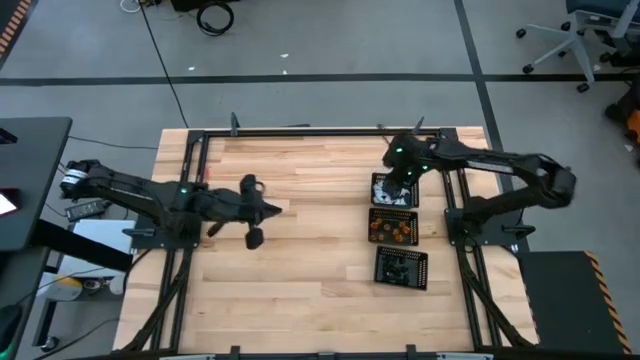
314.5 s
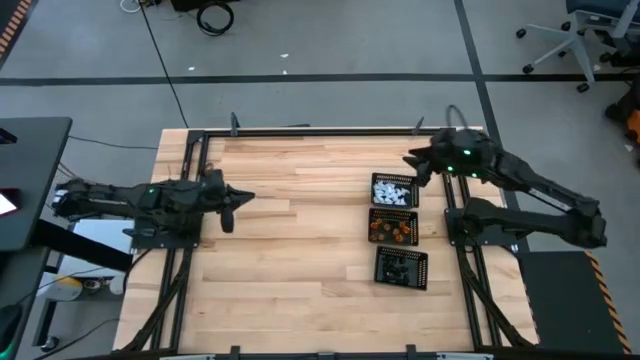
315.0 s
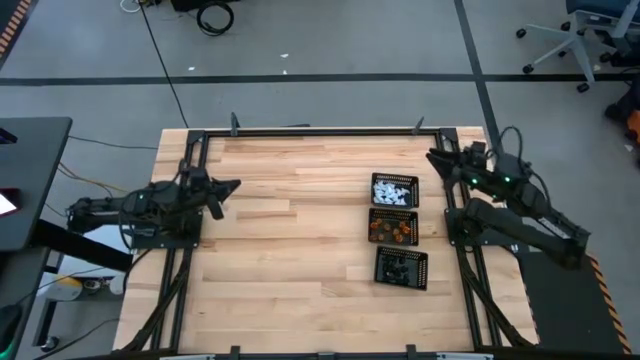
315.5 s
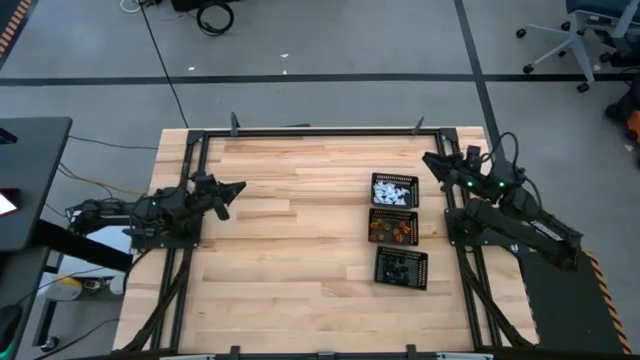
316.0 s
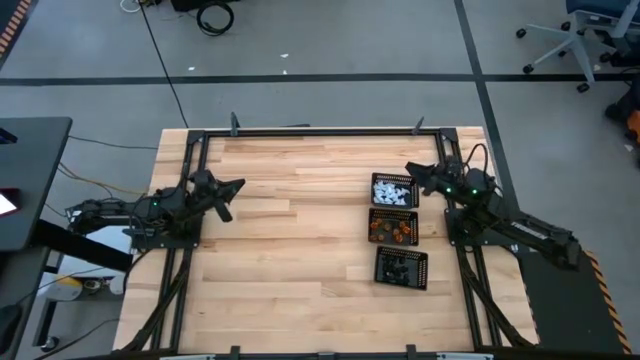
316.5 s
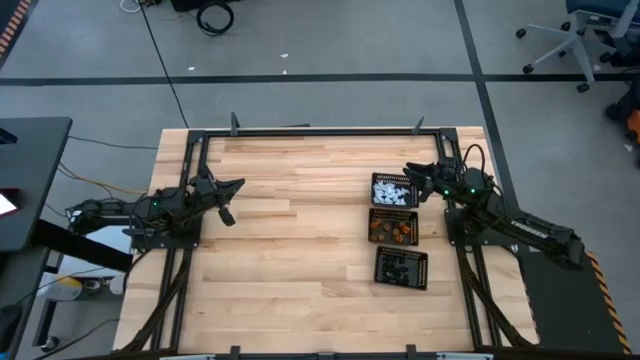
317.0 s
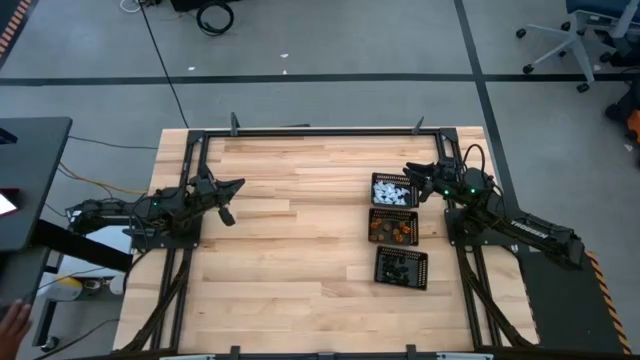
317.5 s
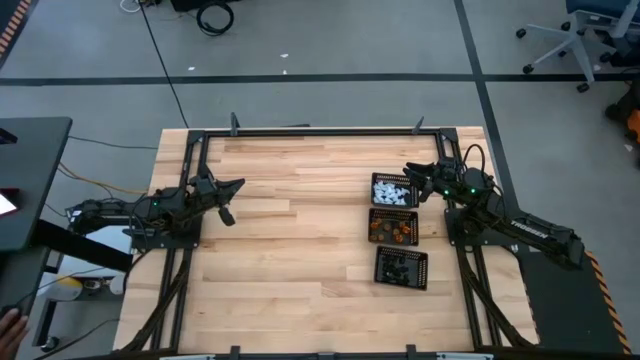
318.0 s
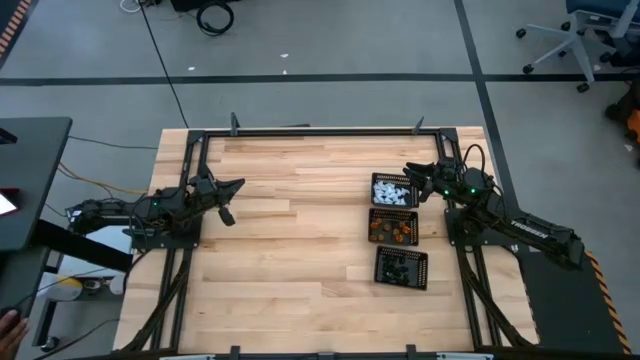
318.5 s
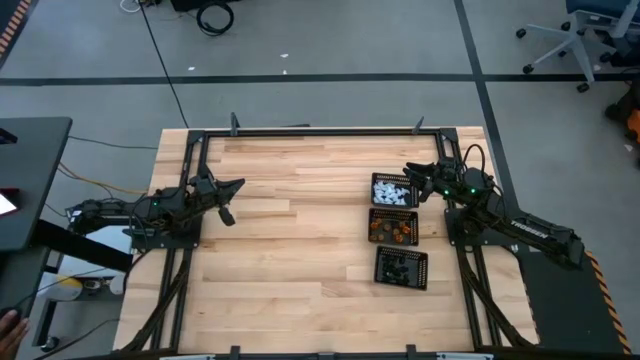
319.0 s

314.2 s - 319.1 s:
Task: Sort Halloween decoration
Return to Home Position

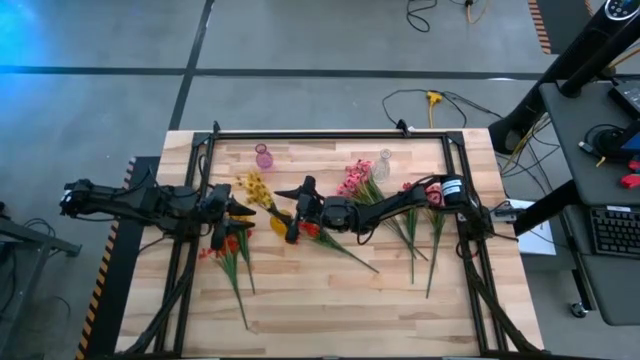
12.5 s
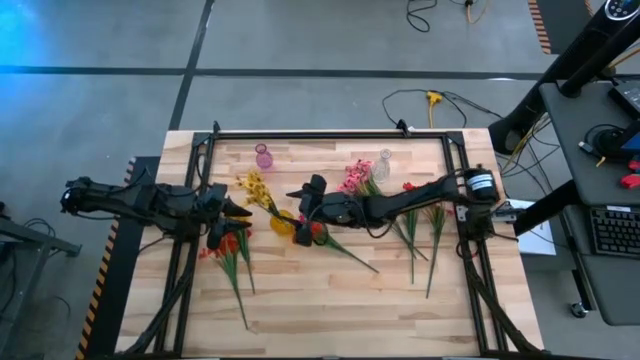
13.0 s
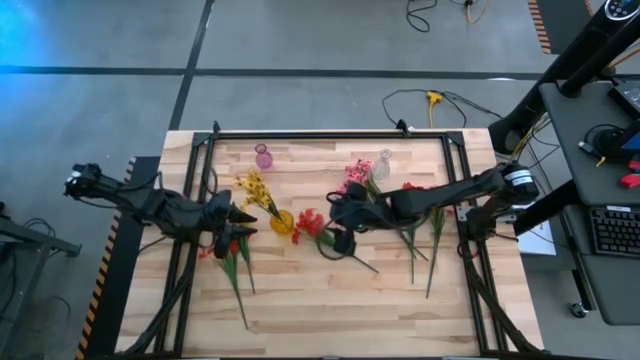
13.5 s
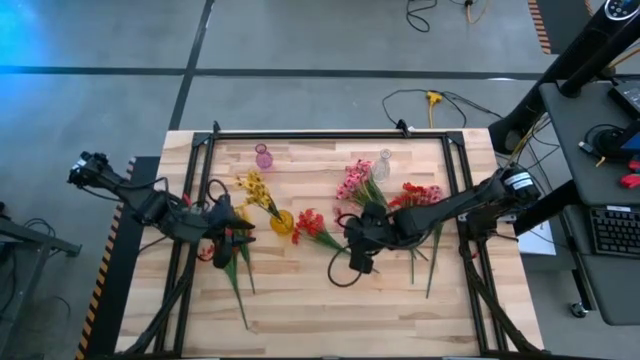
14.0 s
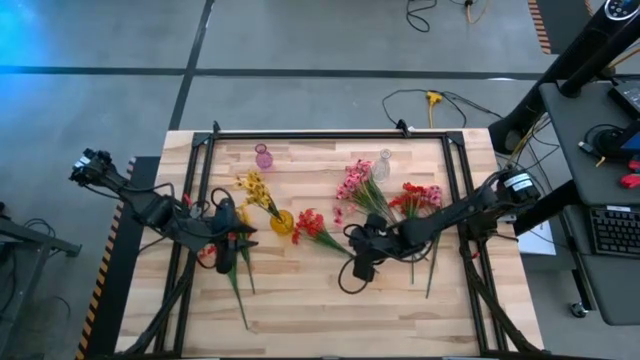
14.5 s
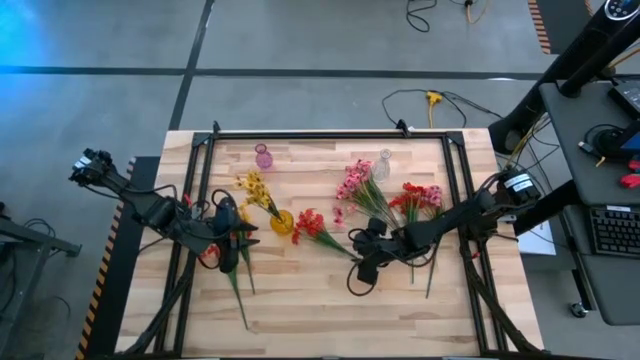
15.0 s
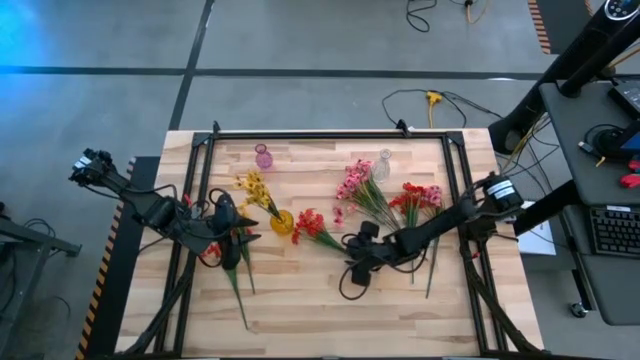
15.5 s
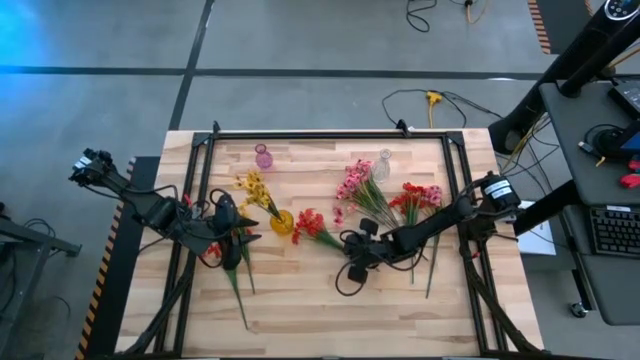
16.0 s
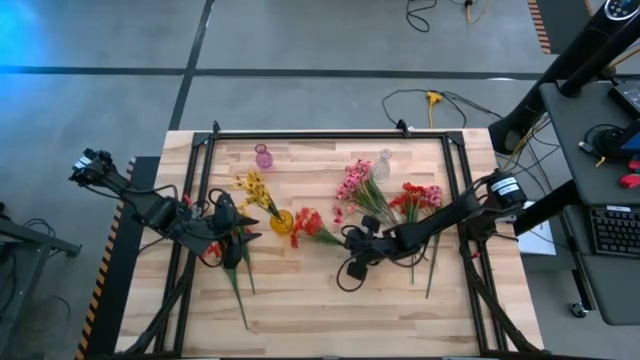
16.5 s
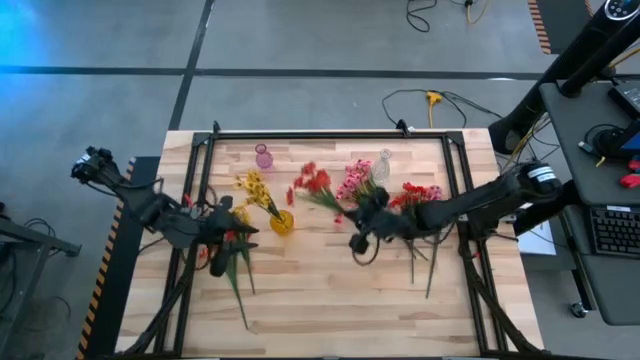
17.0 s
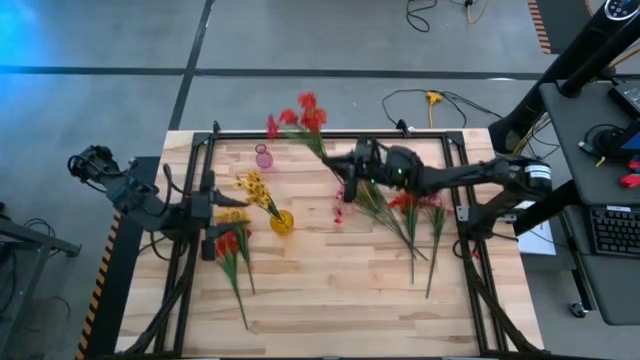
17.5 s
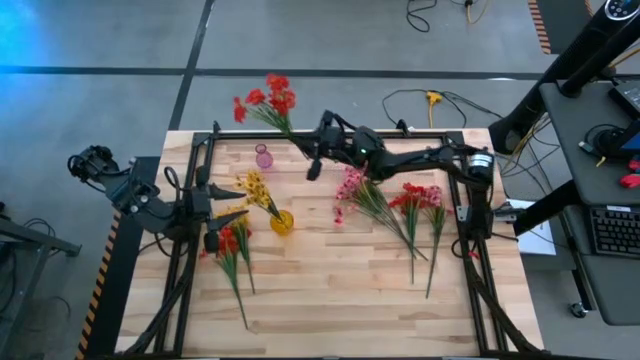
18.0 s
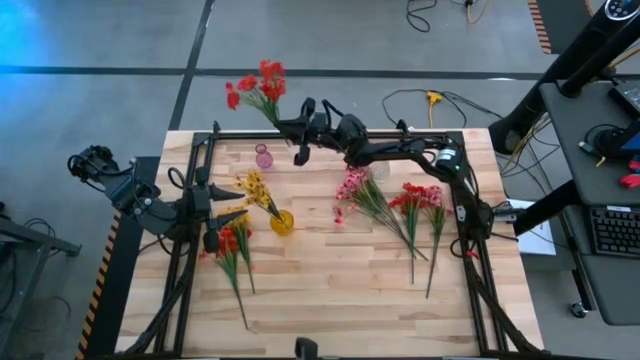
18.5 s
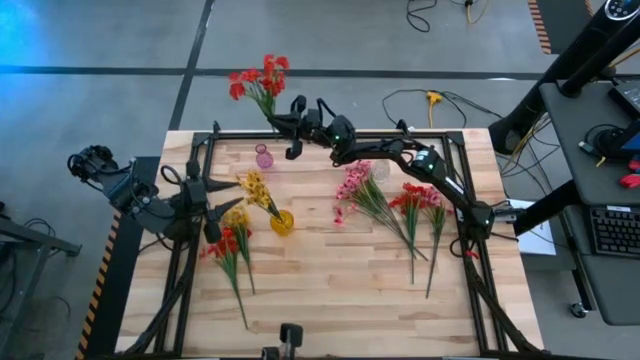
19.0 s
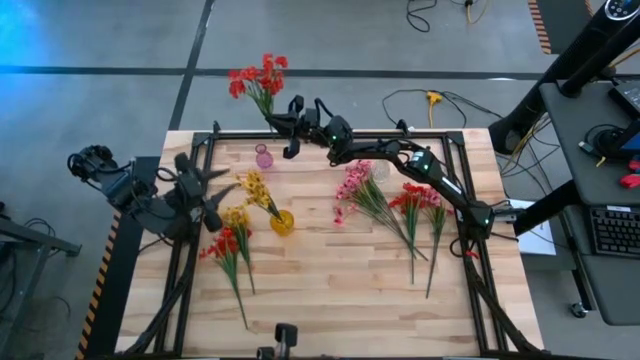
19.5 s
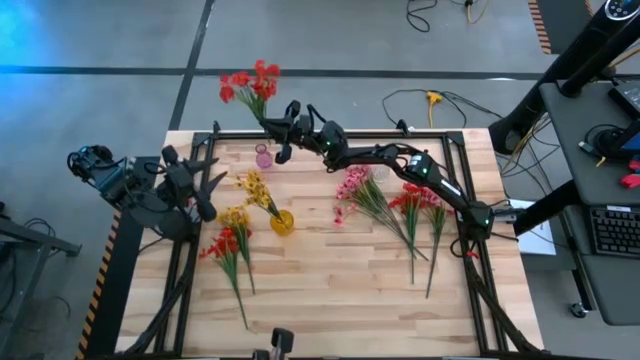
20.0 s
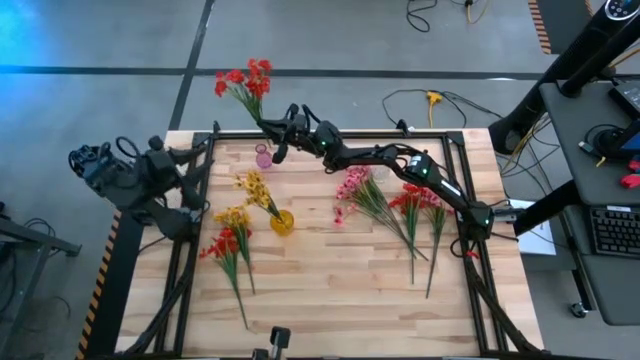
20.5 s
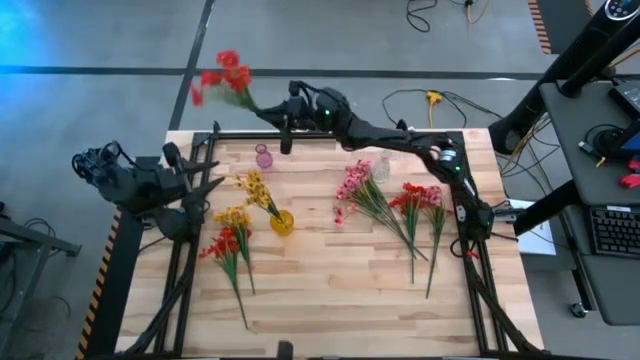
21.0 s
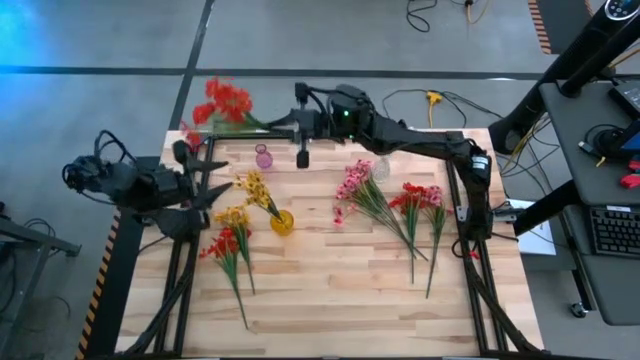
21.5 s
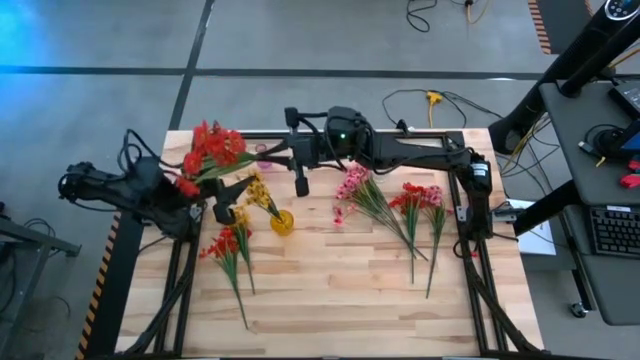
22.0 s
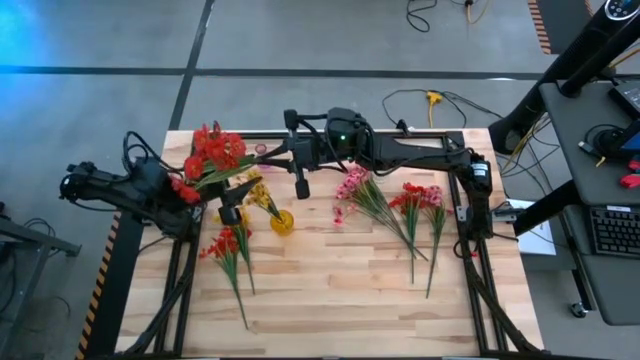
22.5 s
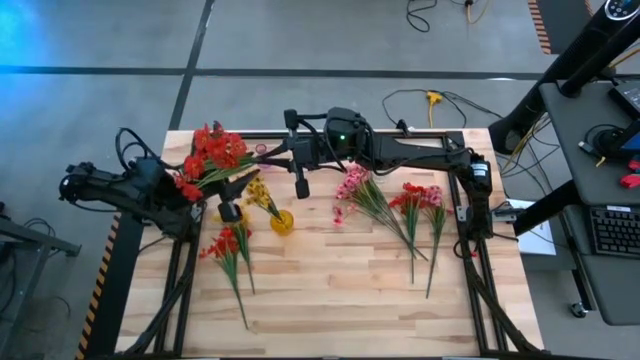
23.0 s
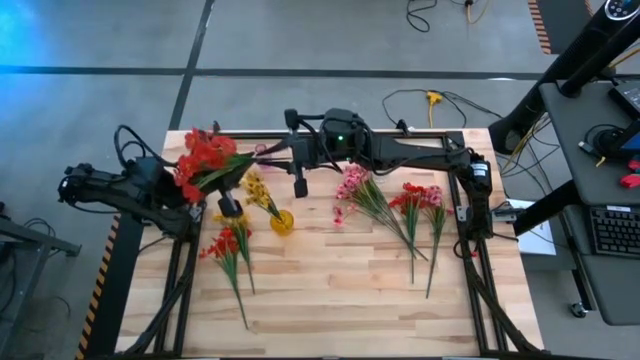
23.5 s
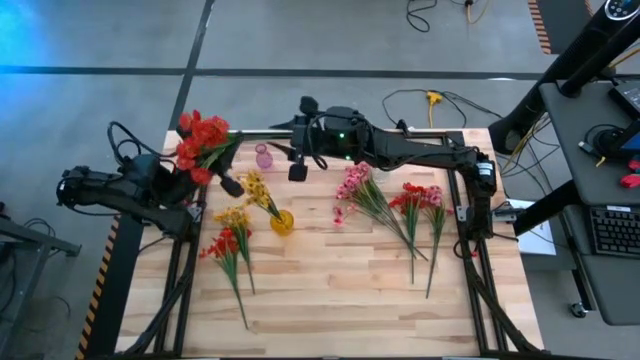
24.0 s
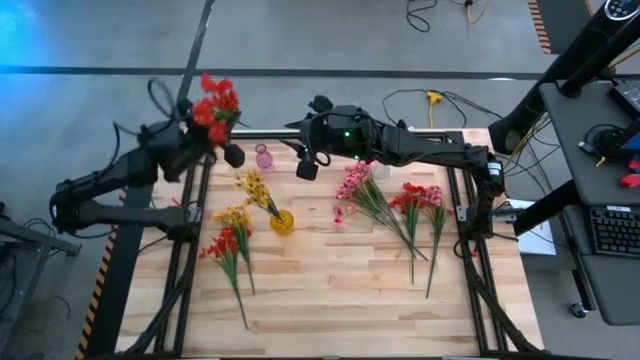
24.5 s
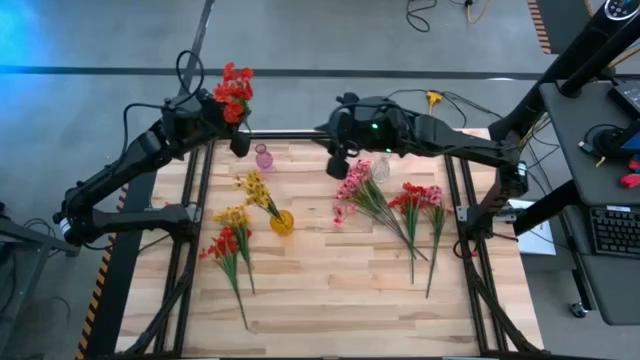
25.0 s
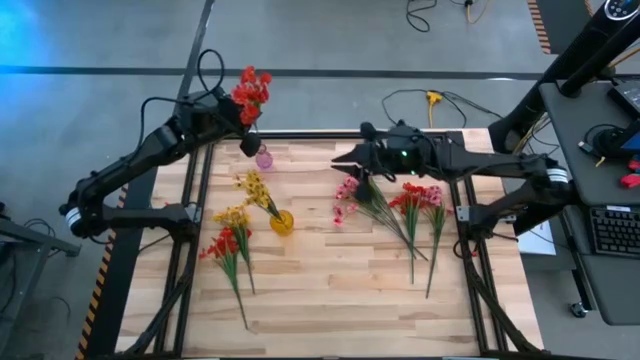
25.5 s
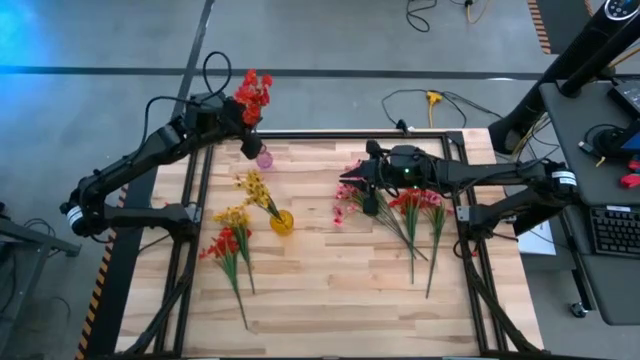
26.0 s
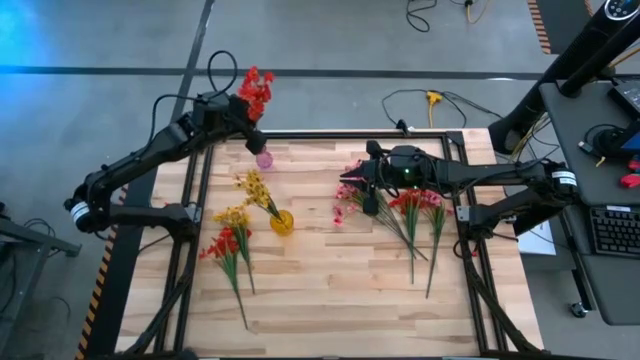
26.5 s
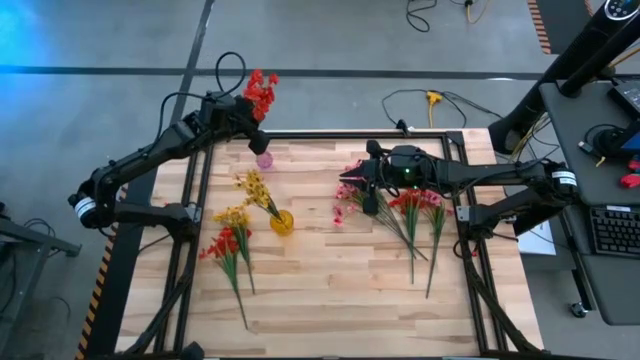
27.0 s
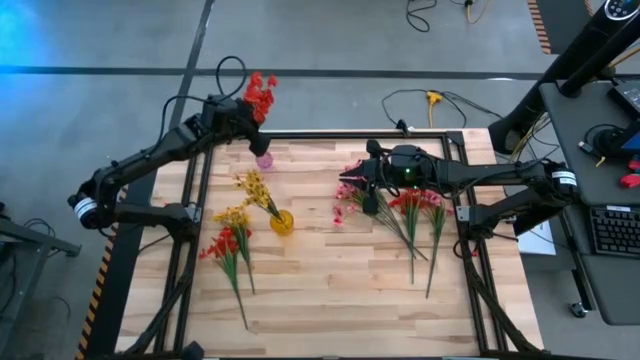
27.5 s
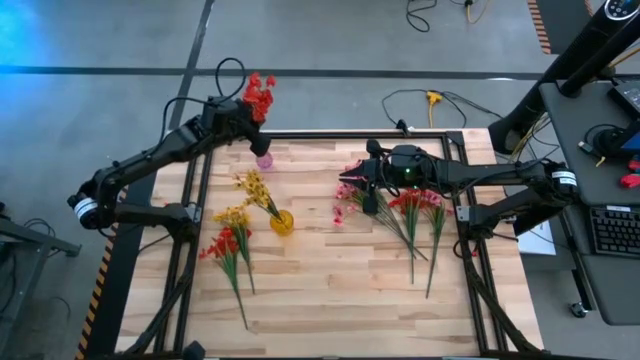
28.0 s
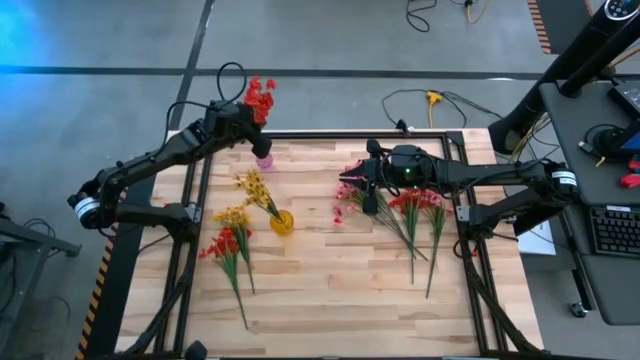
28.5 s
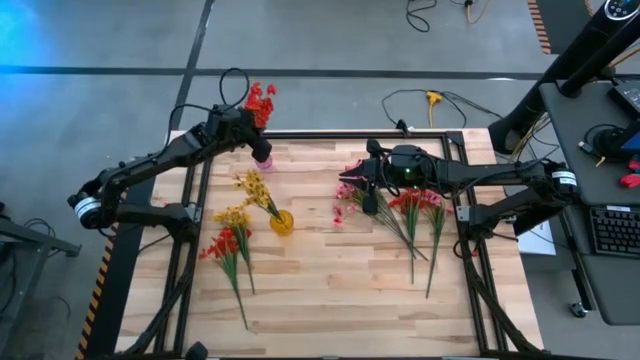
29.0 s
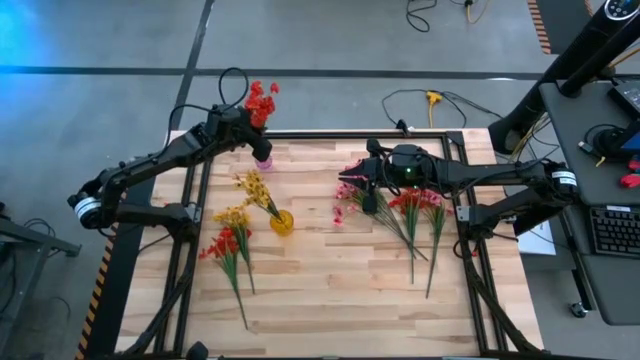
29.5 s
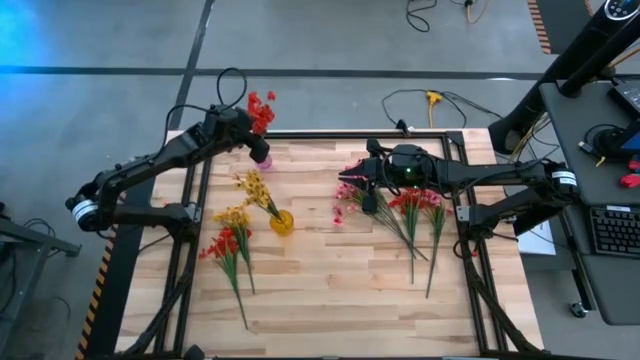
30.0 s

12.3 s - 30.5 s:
Task: Sort flowers into vase by color
Put the center red flower into the pink flower vase
